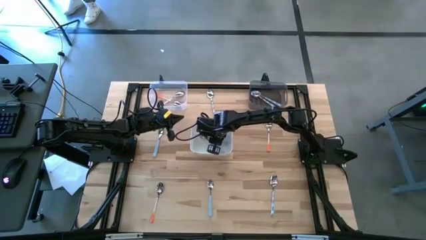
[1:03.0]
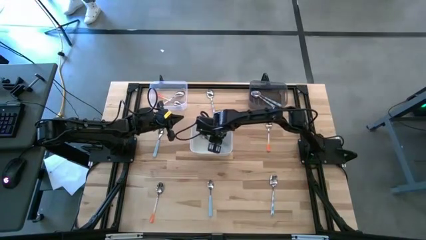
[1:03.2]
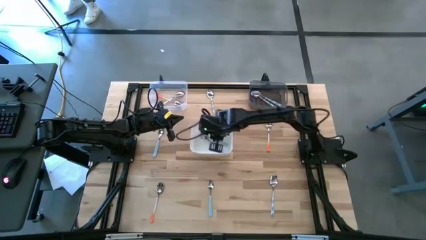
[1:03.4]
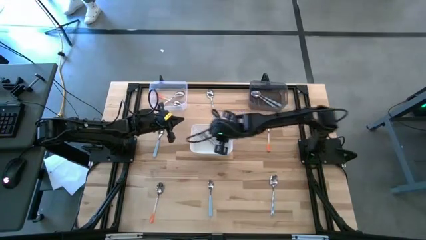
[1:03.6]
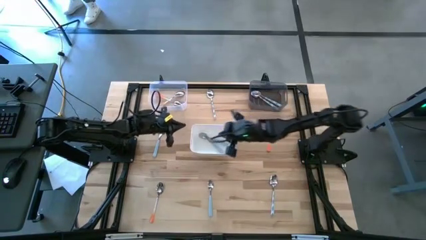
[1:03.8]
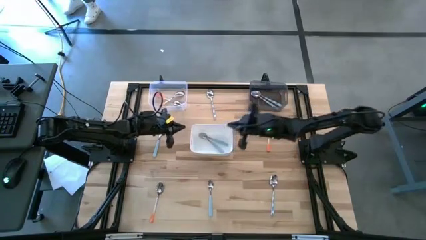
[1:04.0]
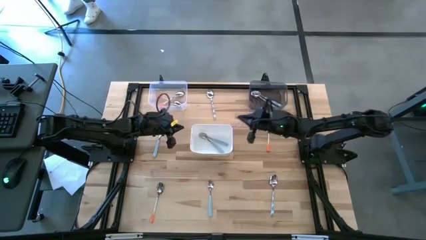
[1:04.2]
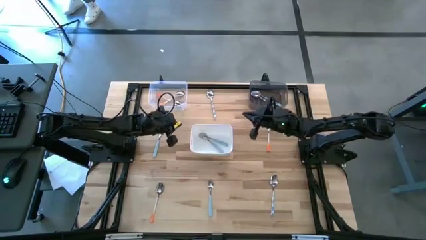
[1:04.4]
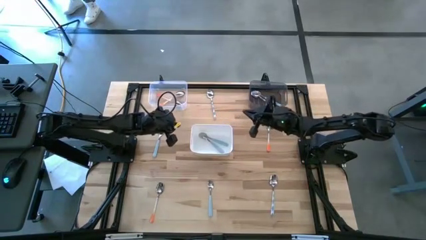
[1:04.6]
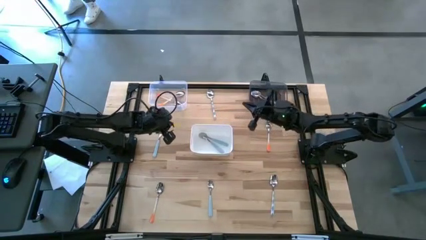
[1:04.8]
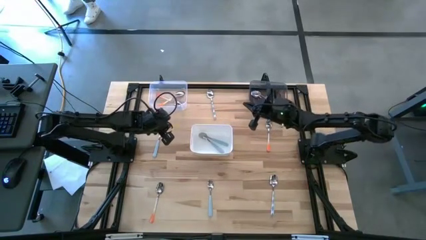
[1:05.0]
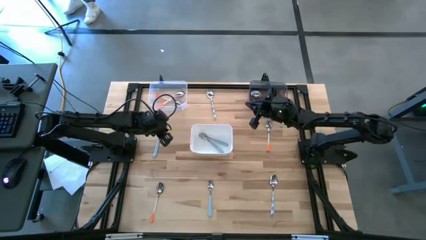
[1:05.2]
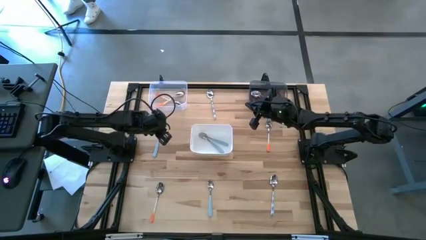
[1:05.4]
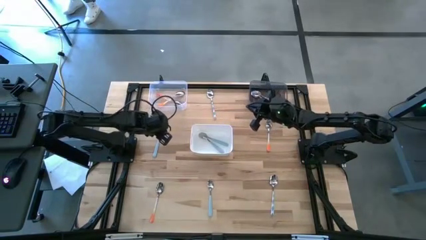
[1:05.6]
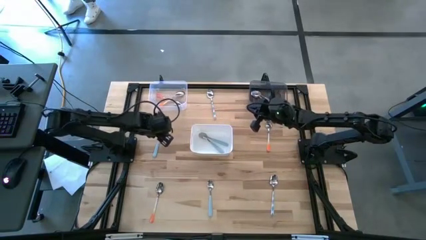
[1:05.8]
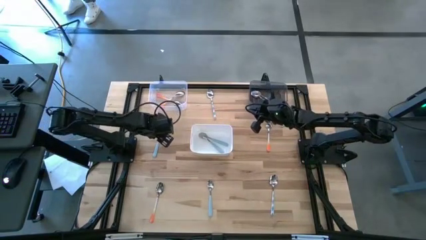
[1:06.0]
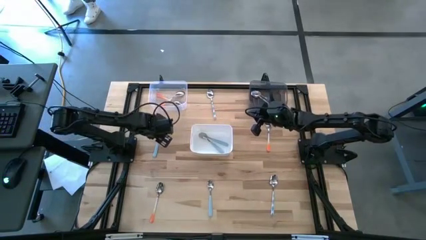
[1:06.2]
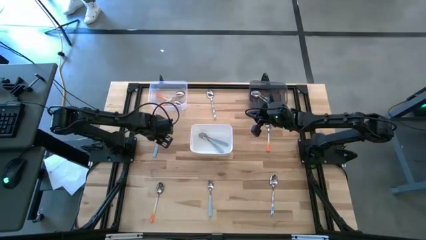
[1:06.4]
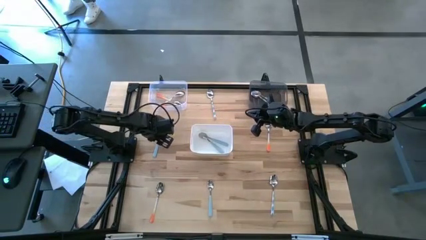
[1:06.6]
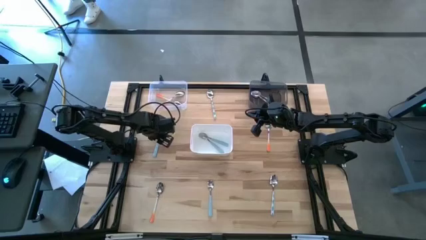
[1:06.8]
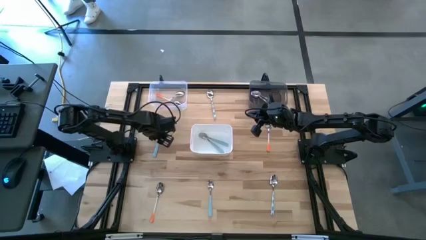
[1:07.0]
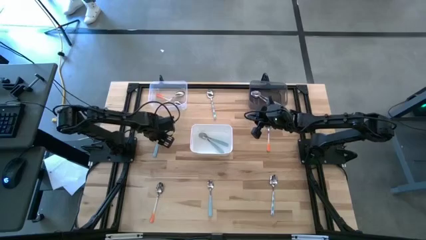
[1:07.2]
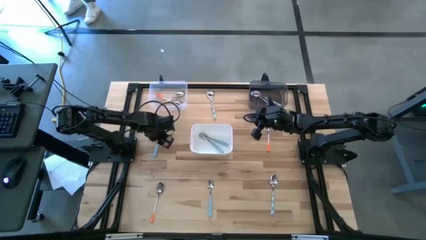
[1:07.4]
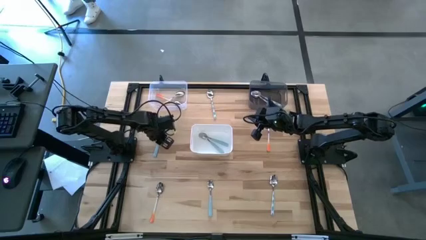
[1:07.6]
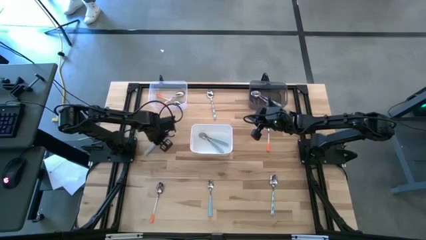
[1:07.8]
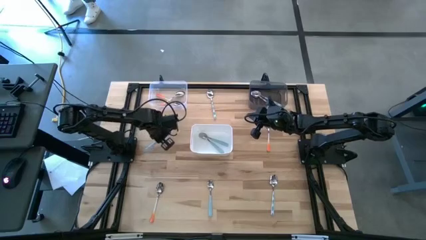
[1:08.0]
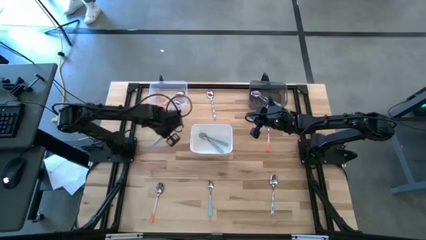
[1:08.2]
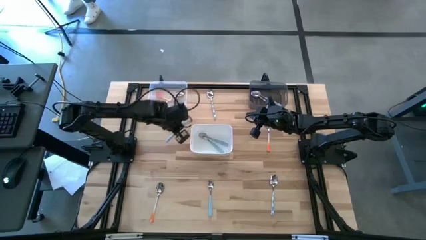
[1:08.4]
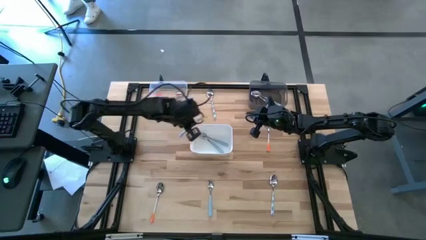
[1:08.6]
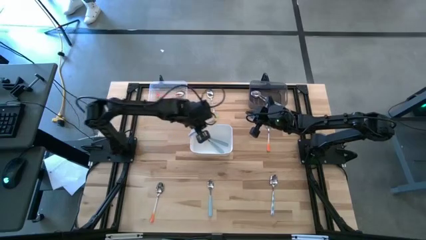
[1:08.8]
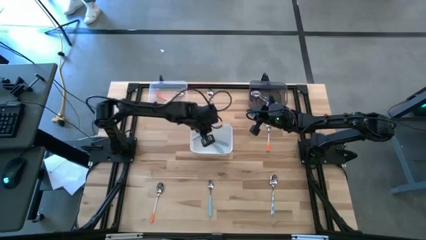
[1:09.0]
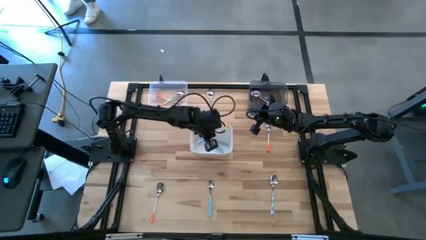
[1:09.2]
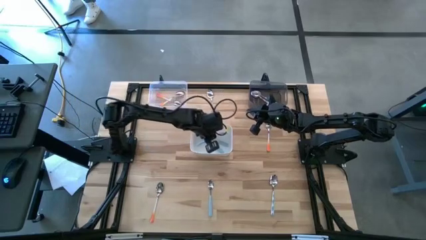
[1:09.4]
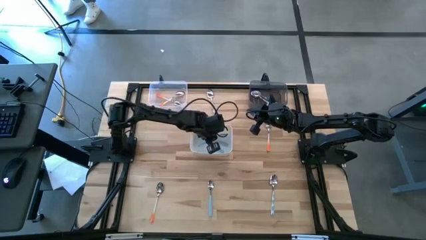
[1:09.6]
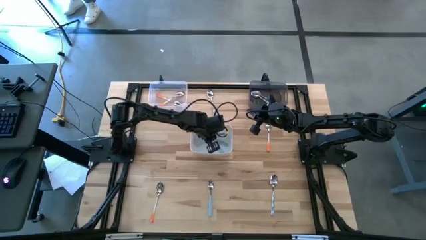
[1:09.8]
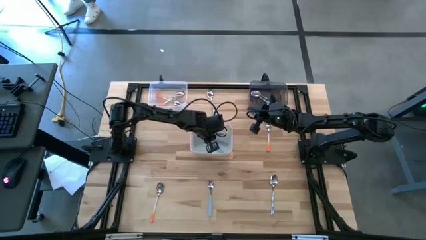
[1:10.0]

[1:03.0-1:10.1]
Task: Sort silverware by color (type)
Put the blue spoon into the white bin

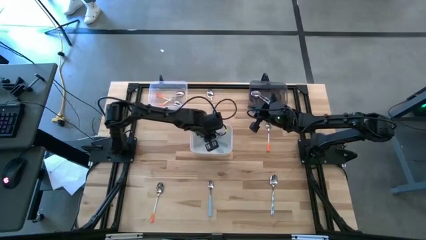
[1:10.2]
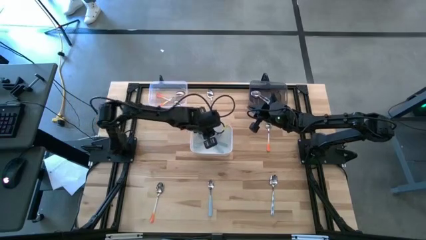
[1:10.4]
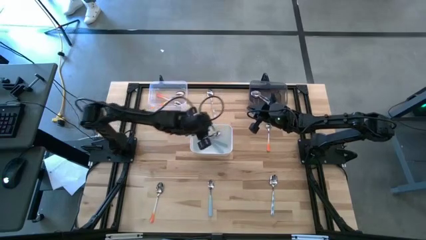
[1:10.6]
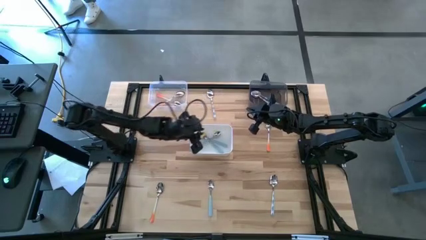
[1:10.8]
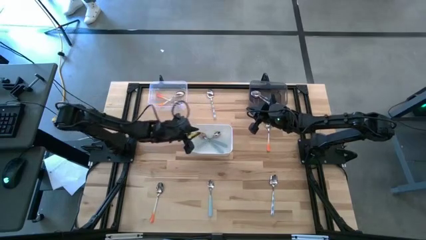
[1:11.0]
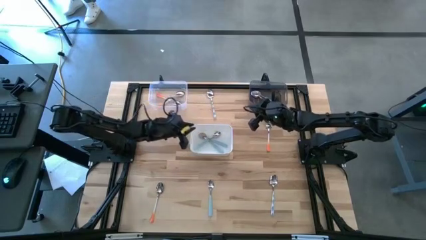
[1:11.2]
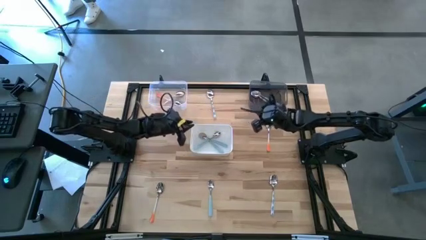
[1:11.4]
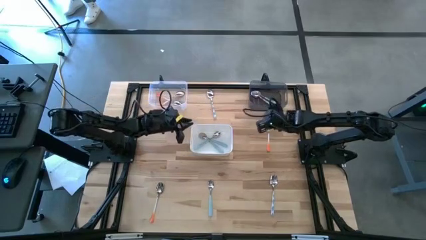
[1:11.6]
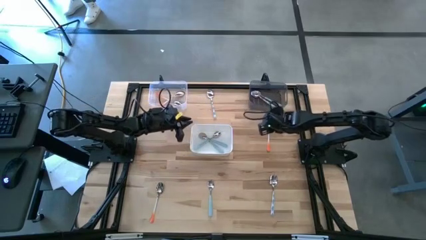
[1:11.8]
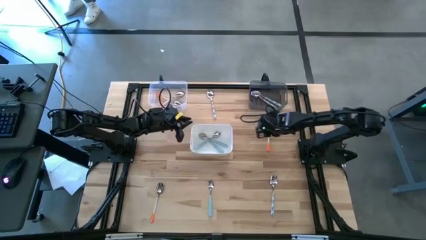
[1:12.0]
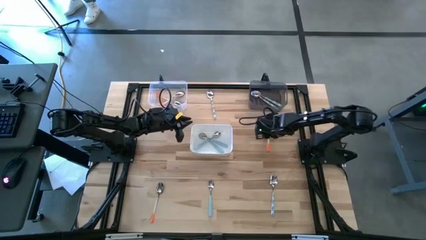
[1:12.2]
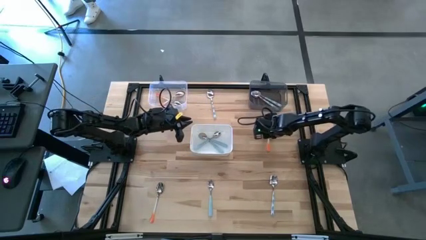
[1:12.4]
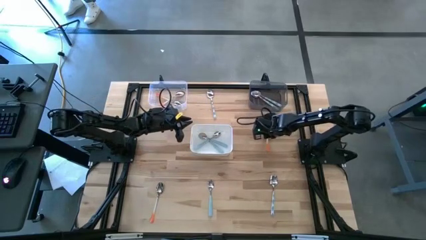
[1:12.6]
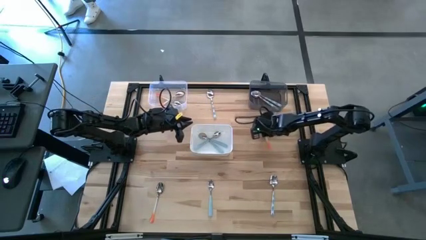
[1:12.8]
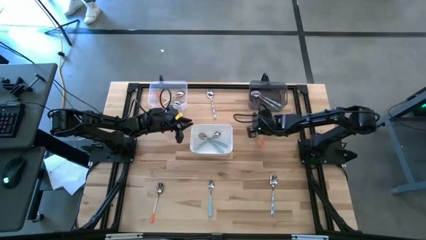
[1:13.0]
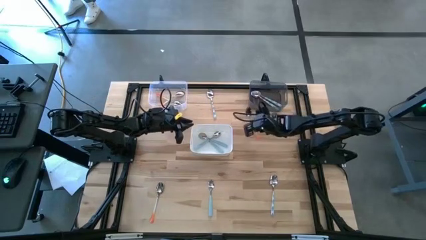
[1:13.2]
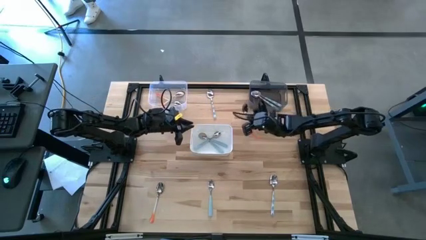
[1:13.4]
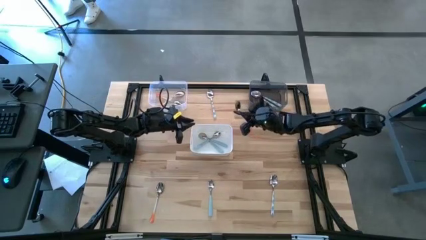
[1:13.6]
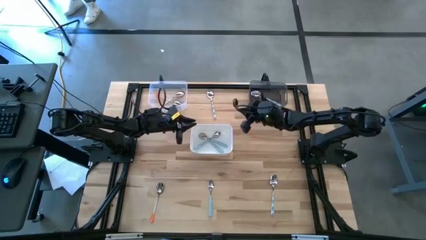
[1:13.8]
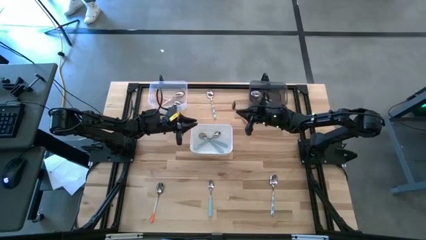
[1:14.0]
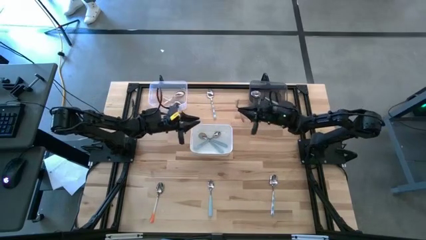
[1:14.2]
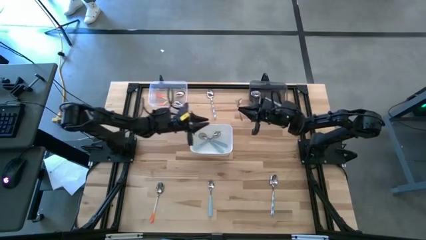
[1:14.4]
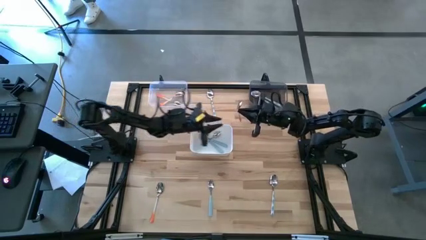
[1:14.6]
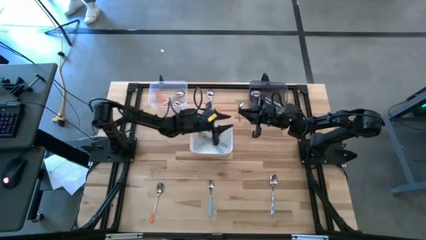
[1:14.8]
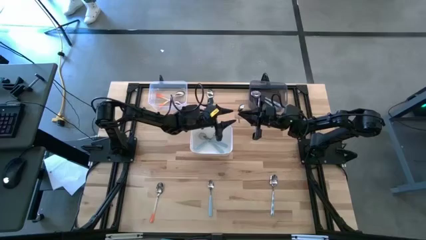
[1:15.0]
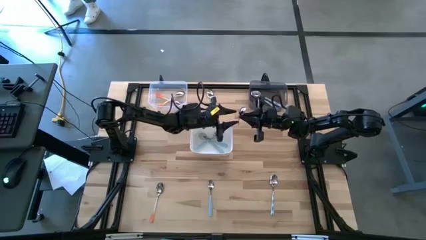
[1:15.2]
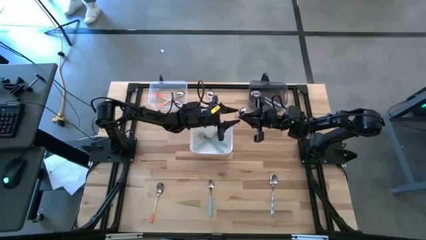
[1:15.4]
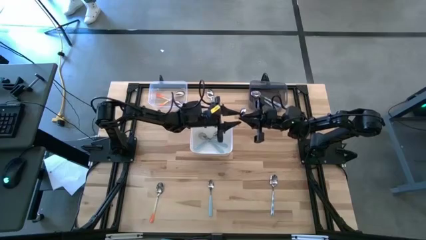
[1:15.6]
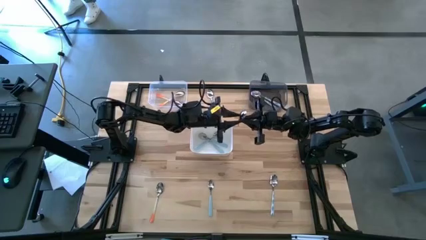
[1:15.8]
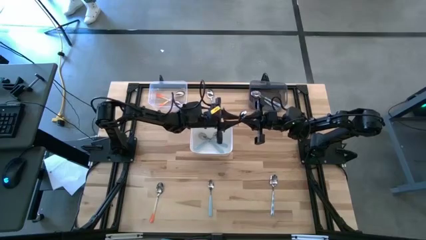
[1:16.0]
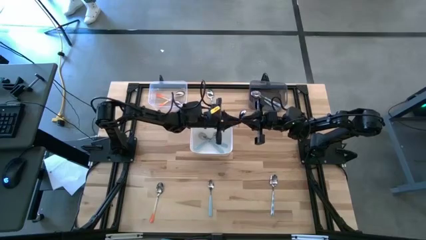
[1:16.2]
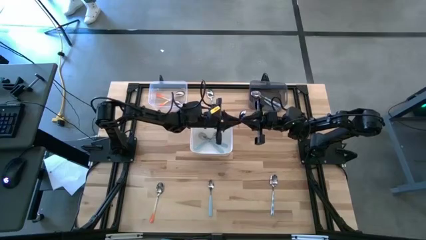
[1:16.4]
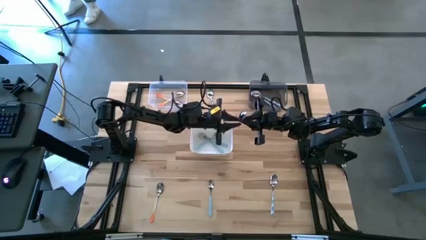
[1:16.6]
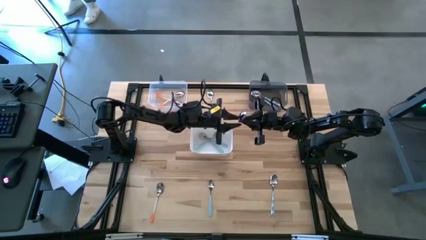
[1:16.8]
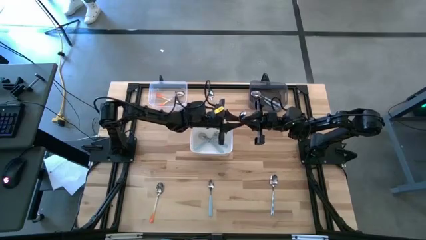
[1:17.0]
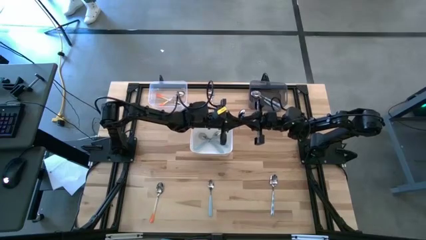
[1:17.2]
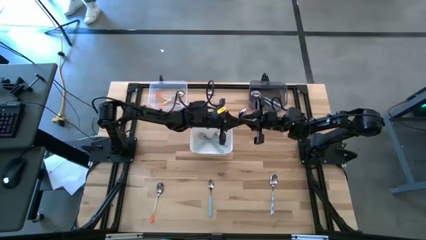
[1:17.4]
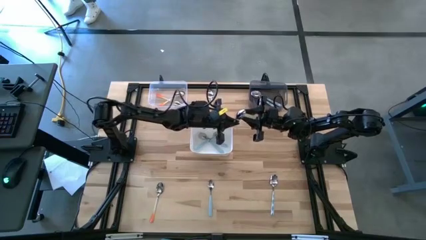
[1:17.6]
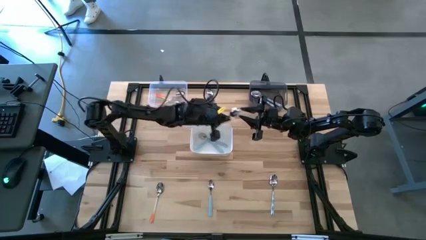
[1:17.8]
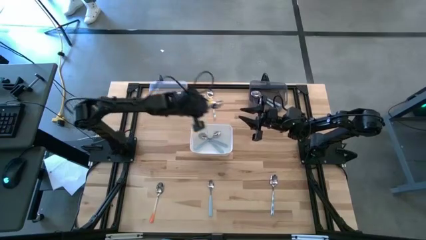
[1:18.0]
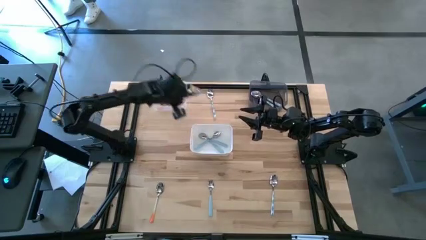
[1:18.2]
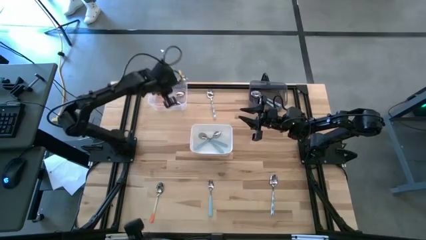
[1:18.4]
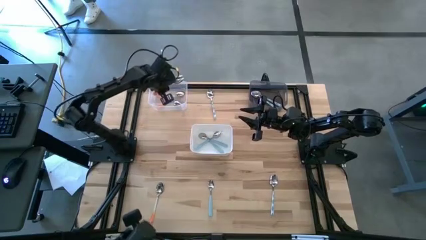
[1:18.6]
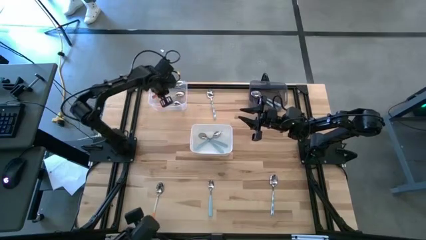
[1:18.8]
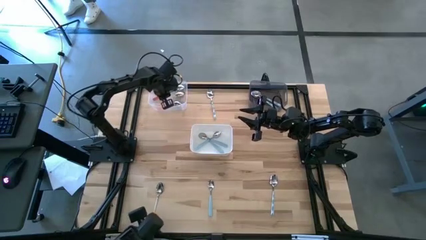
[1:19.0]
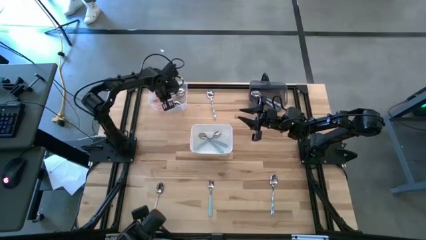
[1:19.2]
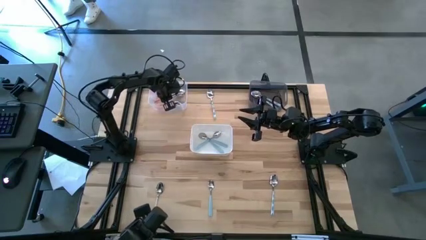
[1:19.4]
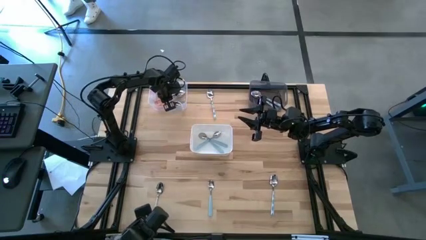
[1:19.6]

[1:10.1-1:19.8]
Put the orange spoon into the transparent bin

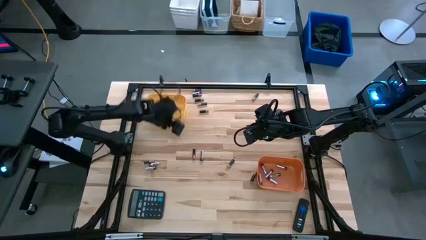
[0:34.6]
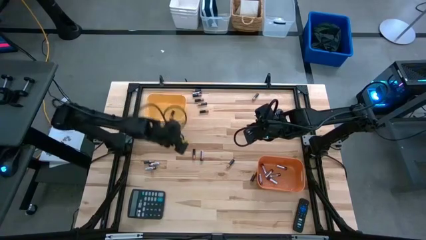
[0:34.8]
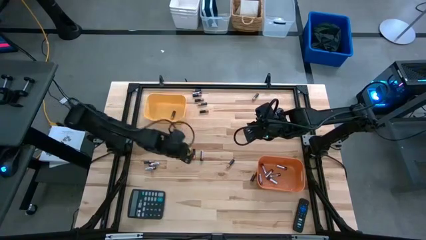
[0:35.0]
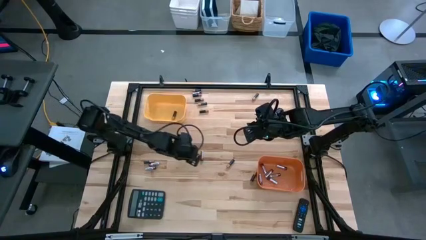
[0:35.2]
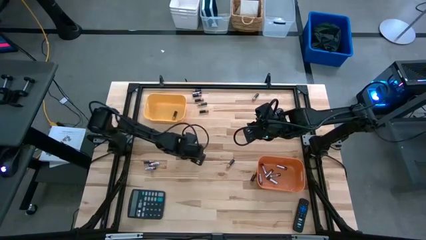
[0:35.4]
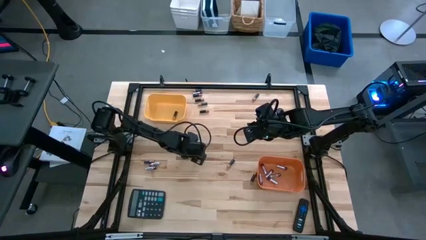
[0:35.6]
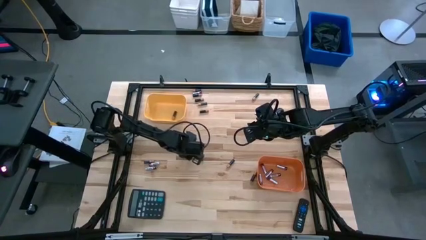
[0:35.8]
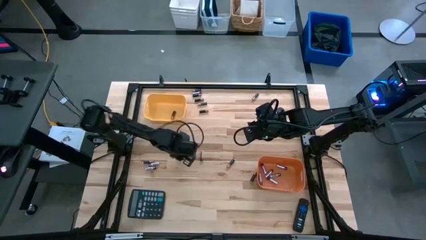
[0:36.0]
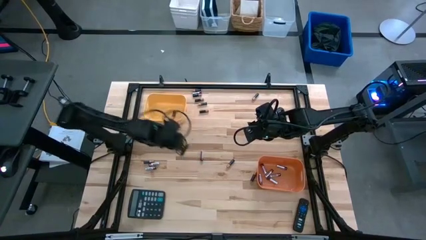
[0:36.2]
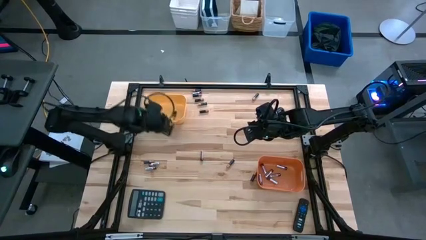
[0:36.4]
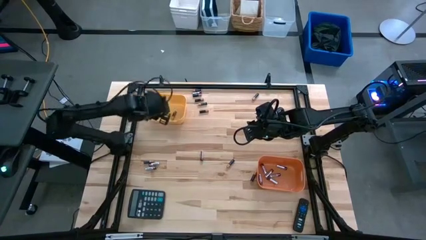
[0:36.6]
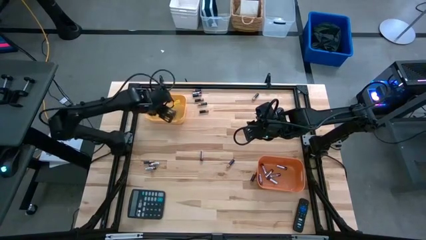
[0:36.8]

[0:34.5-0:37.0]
Task: Sort batteries
Put the black battery into the yellow bin
